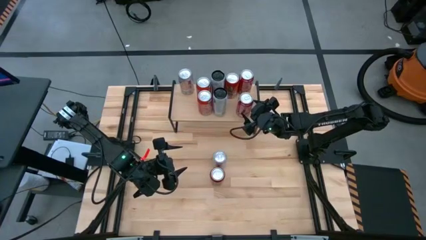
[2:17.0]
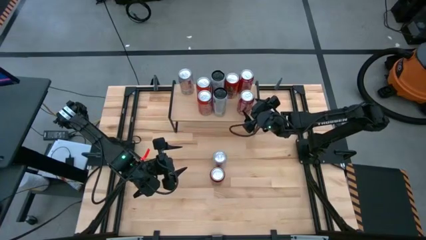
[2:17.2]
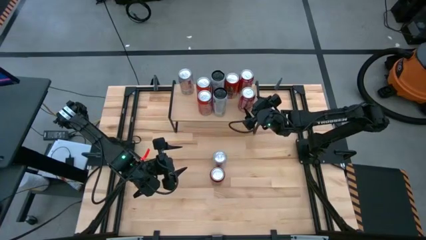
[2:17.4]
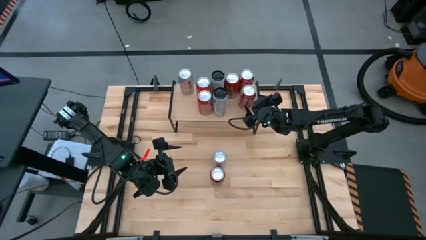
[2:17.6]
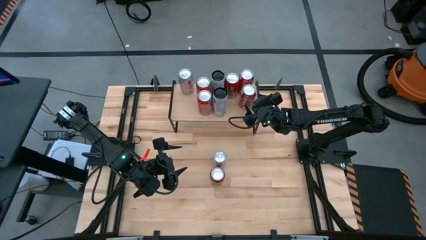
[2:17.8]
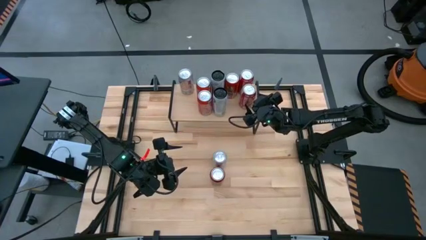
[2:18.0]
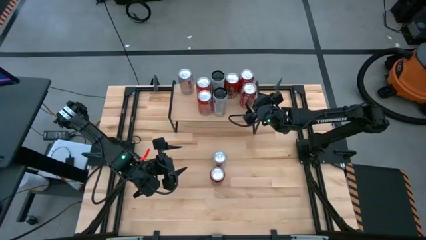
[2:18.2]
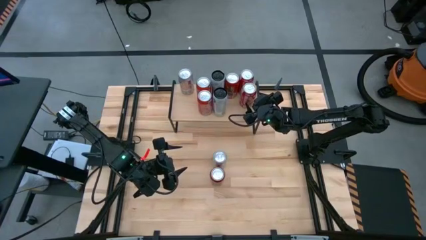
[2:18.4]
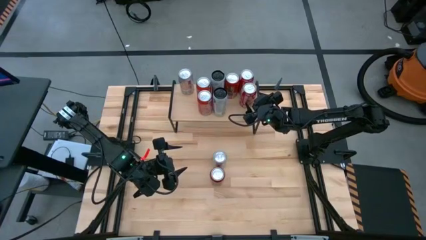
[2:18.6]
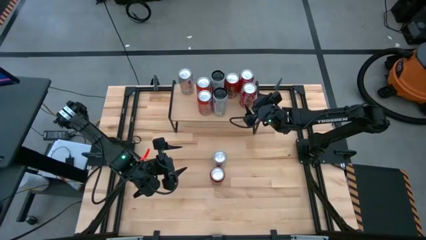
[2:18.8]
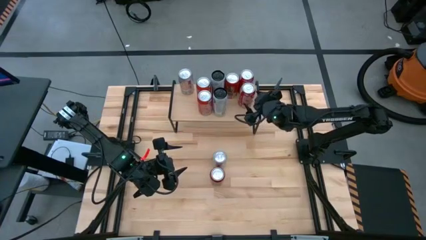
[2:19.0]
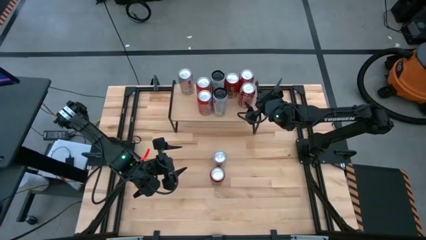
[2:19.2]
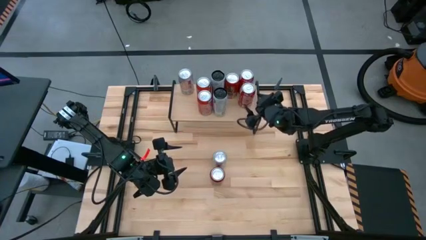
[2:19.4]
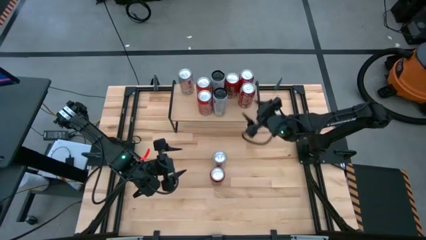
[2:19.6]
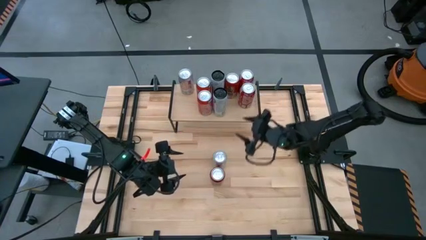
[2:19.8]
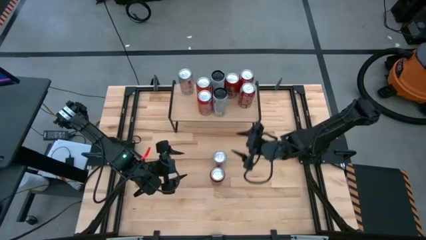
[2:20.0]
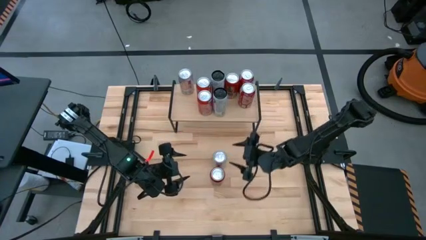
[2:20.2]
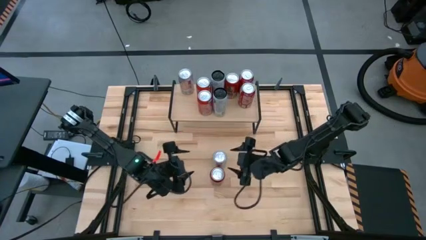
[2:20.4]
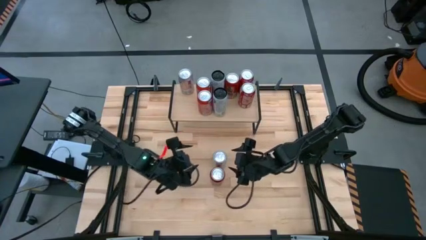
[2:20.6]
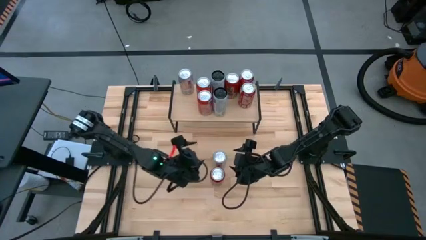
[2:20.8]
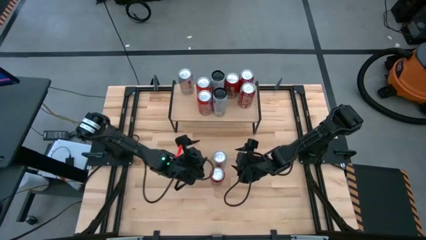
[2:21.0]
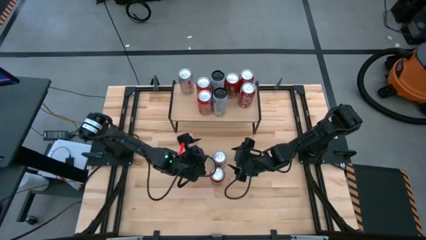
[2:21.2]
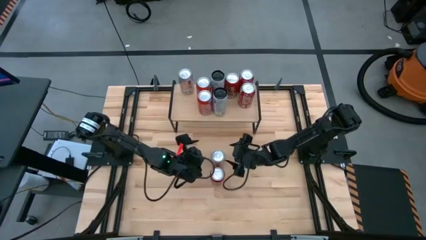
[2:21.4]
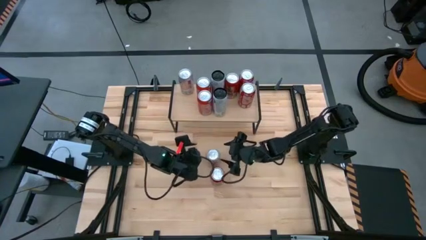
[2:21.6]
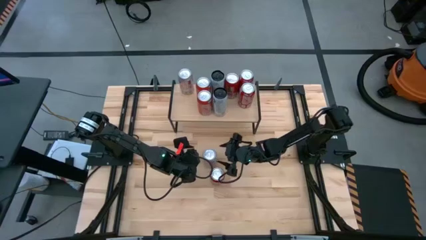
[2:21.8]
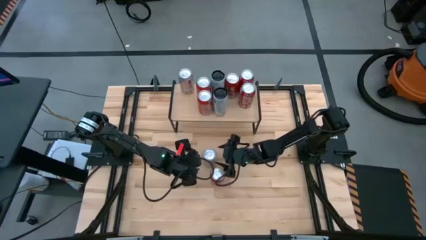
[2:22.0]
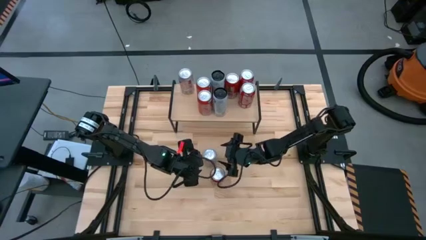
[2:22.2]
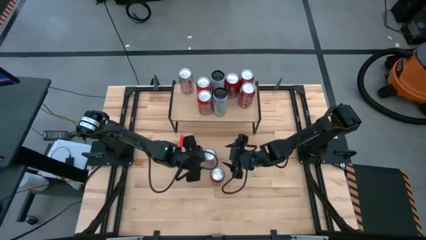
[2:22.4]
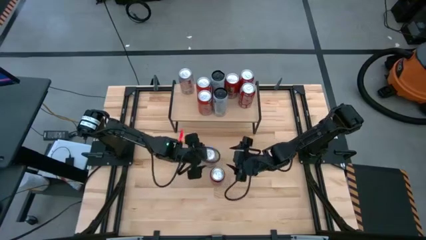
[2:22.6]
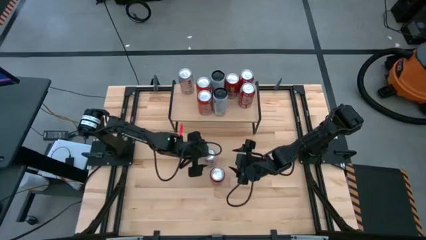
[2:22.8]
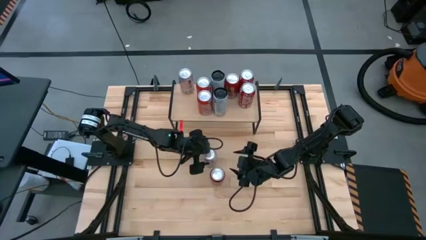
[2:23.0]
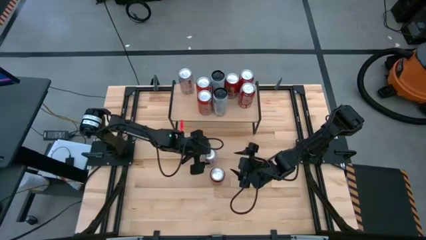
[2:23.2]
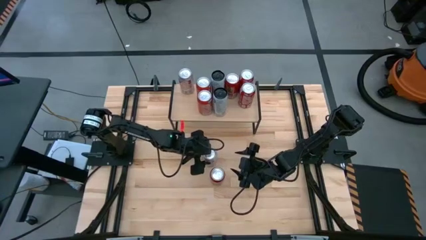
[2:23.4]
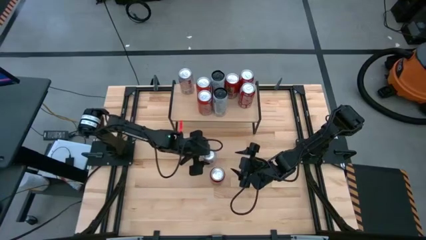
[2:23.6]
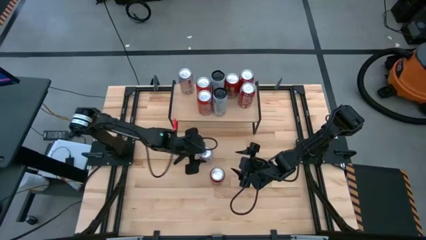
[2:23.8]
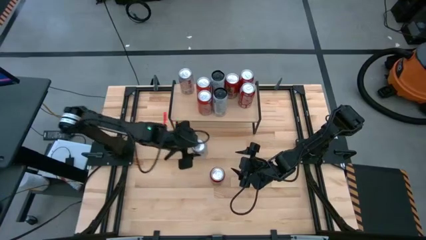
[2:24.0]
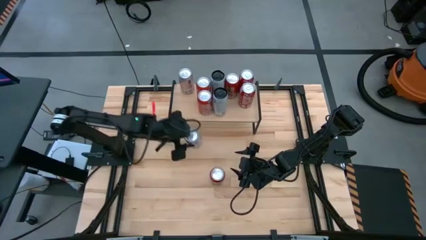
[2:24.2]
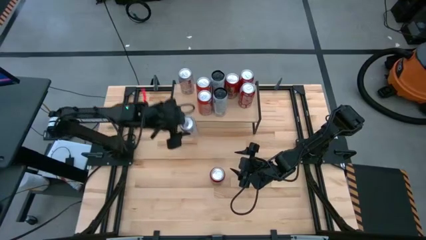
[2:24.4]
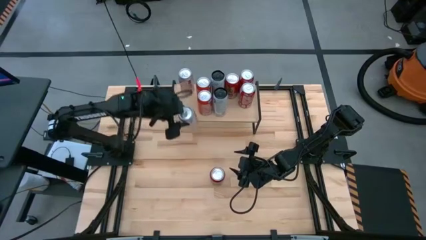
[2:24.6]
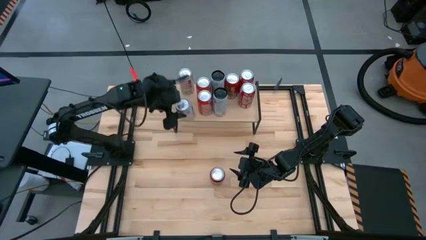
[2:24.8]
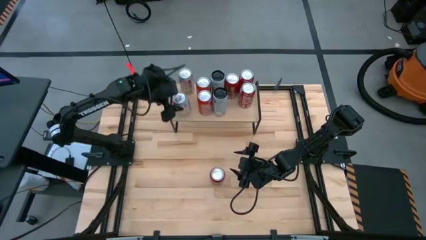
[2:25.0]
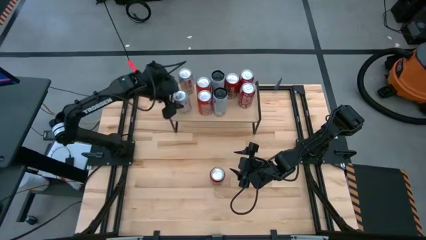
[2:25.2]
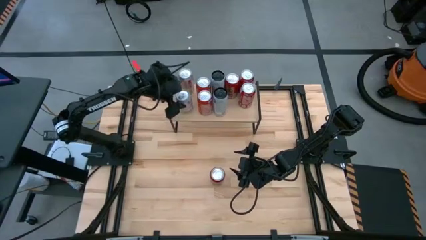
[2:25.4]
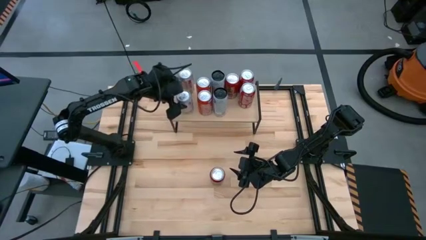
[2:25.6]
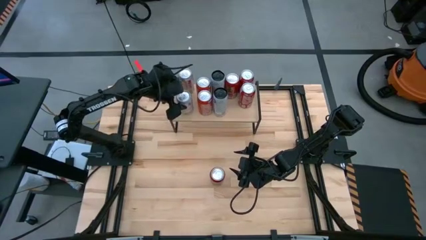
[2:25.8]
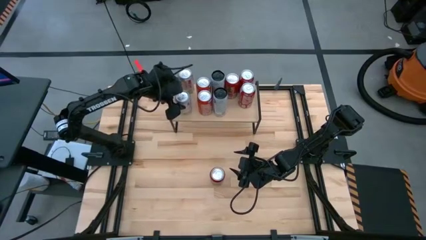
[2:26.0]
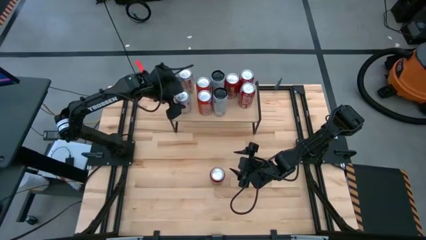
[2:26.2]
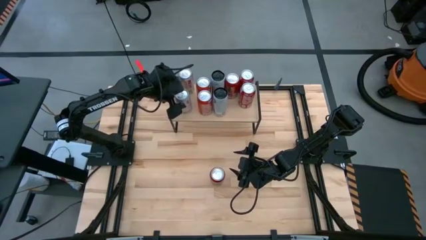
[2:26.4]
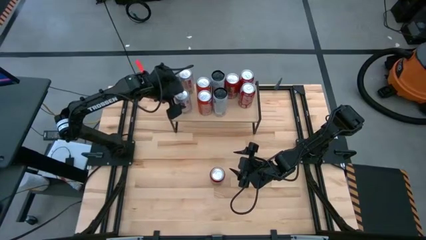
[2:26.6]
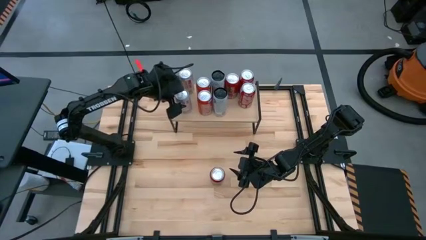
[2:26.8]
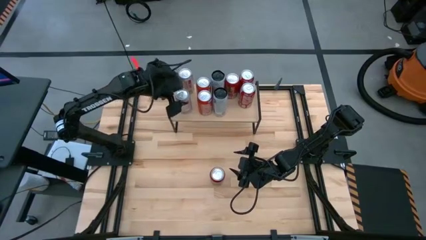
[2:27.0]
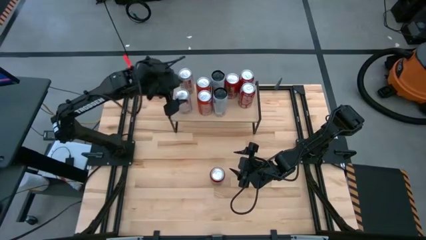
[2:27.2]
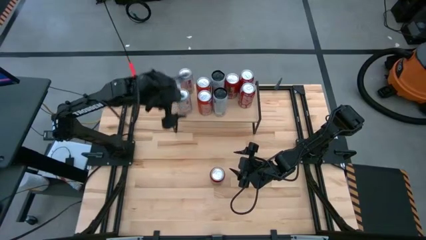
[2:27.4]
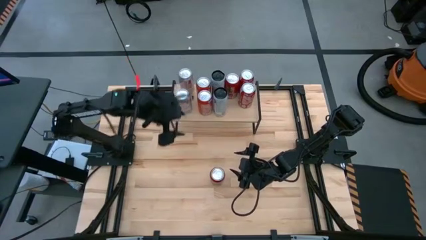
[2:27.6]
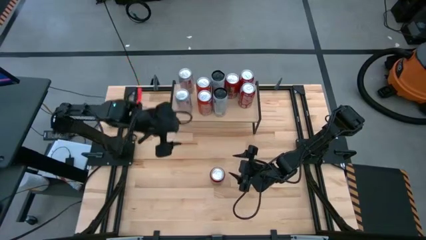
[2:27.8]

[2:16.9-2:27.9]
Task: Place canned beverage on shelf
Put the white soda can on the shelf aligned with the other white soda can

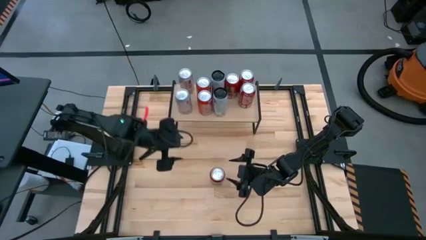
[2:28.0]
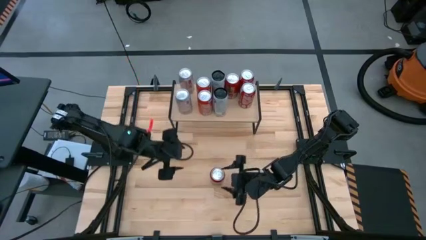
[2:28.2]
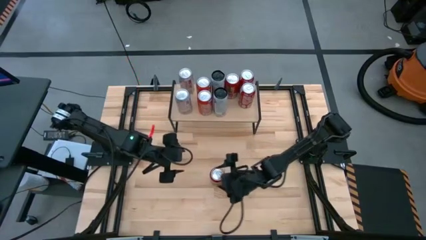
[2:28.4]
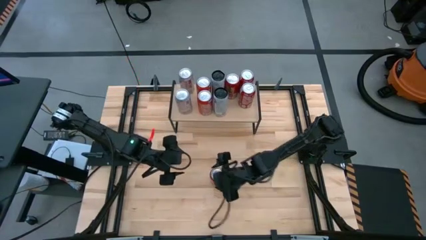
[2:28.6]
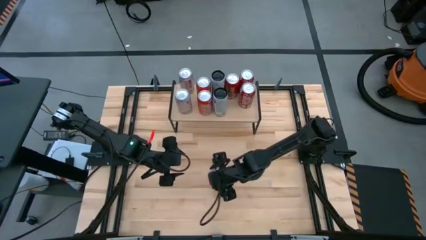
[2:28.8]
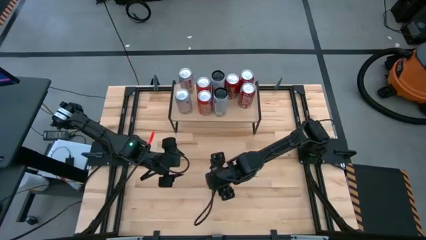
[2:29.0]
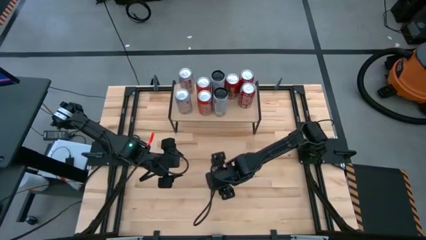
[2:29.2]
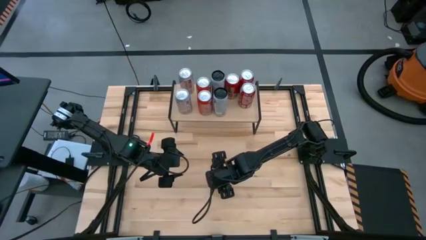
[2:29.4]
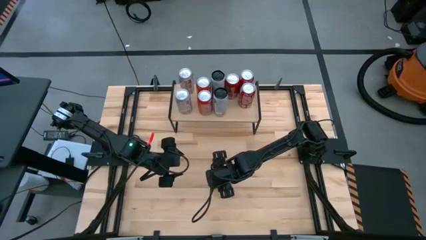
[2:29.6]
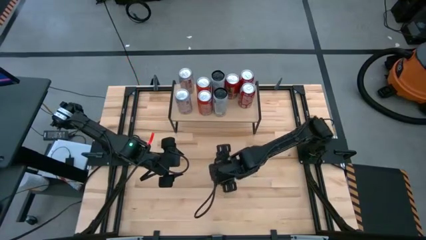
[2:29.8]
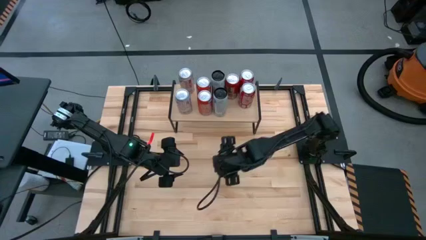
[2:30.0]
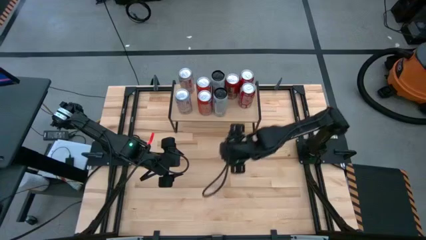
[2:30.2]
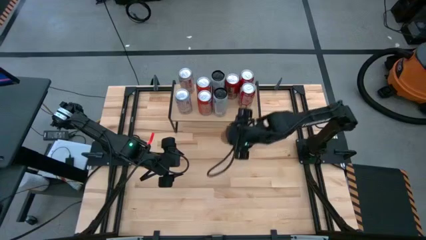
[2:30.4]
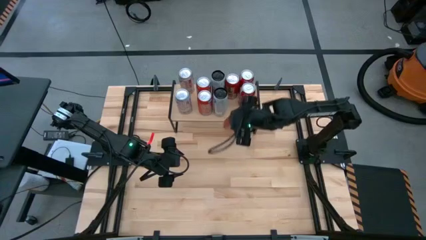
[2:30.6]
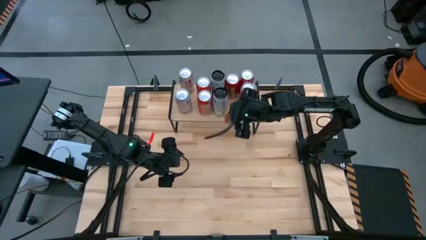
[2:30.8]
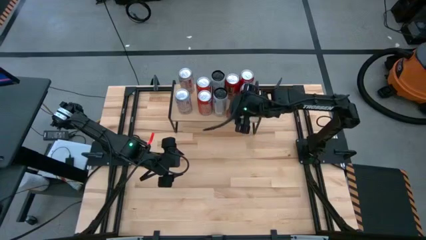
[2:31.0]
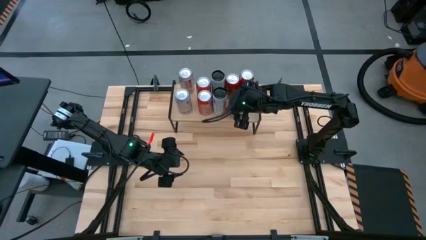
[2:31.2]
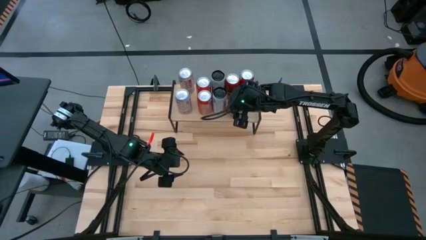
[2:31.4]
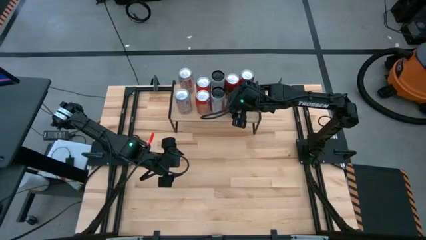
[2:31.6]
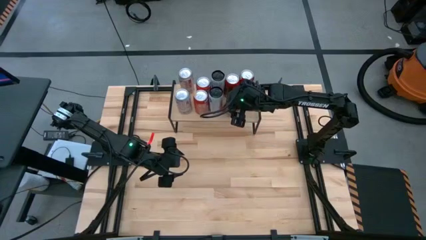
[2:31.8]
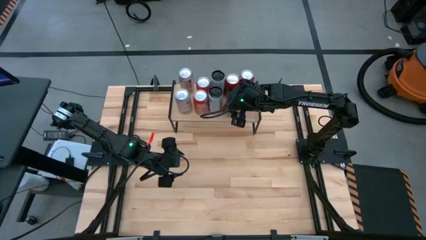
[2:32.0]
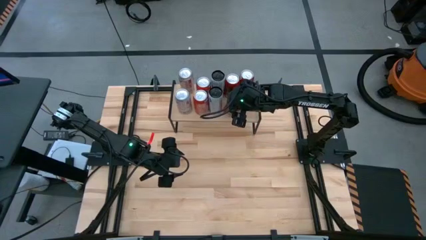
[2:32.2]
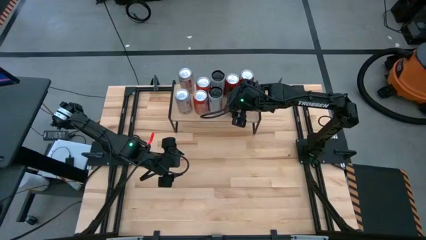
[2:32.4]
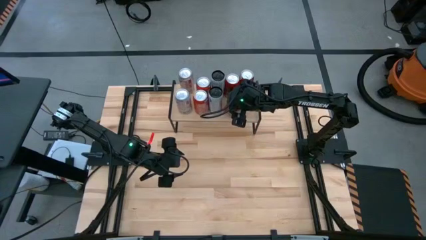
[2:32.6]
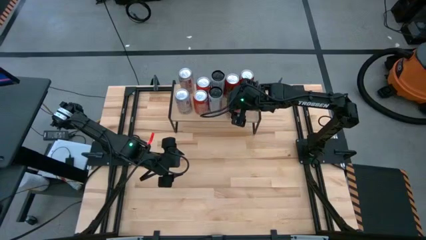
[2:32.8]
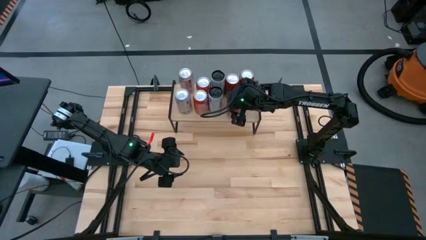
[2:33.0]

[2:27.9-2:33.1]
Put the red soda can on the shelf aligned with the other red soda can
